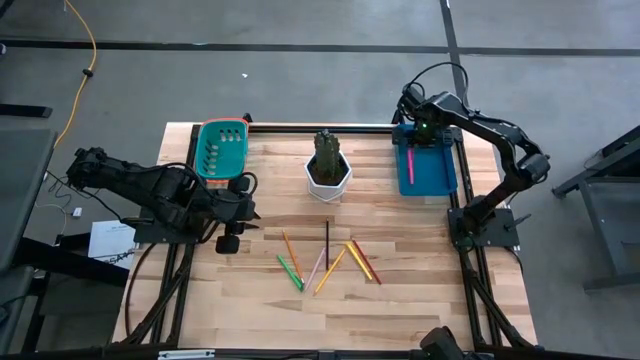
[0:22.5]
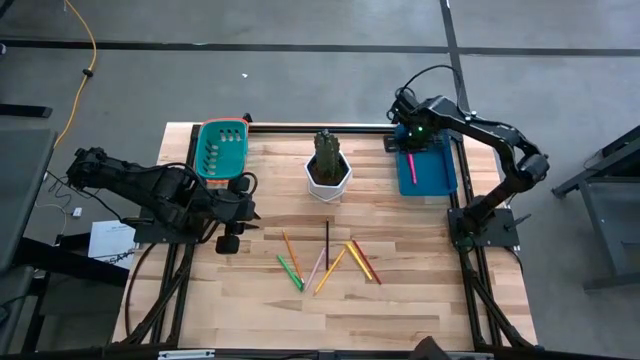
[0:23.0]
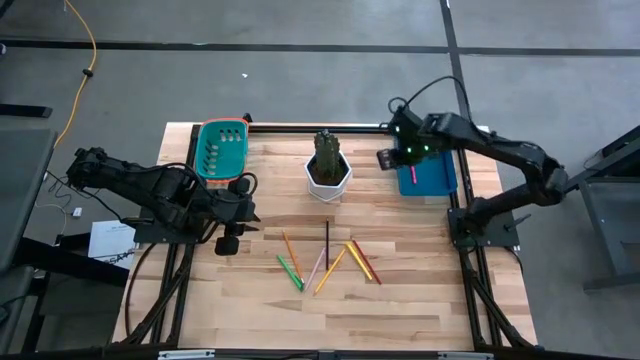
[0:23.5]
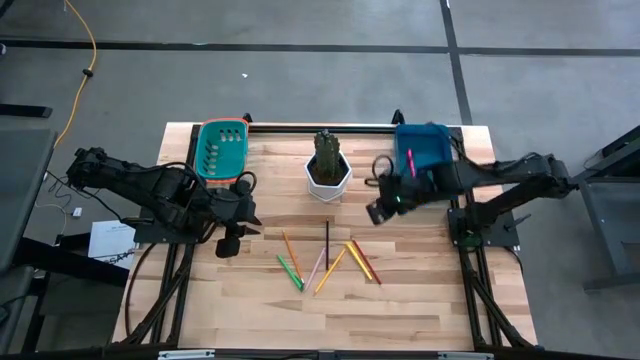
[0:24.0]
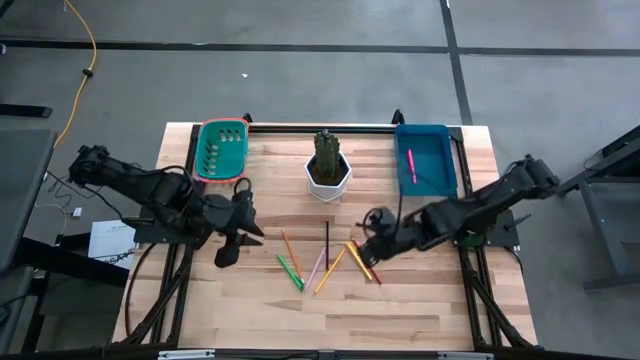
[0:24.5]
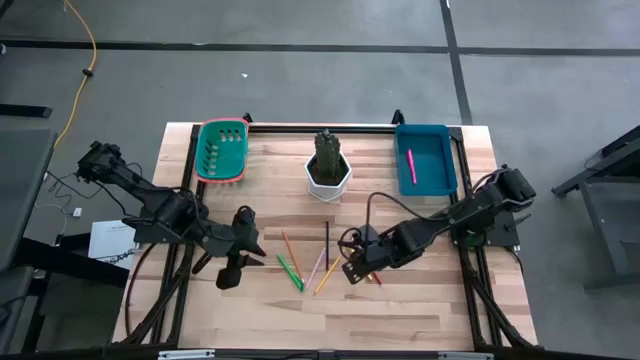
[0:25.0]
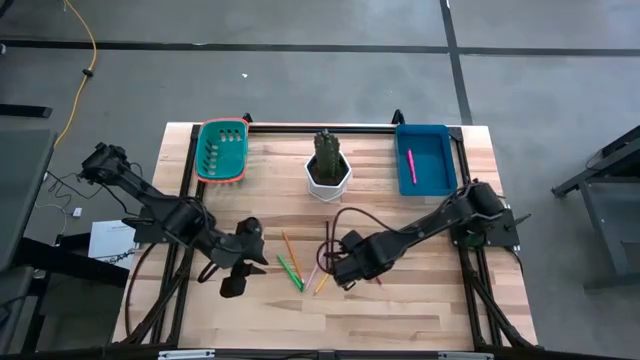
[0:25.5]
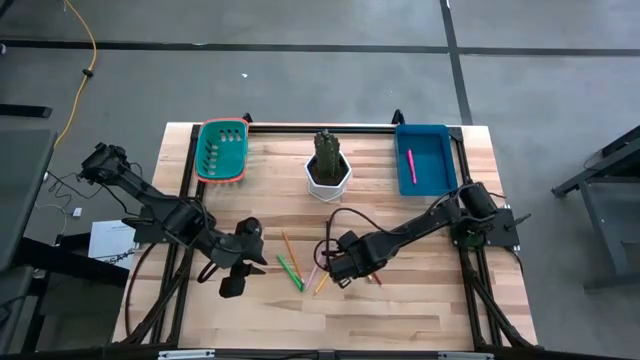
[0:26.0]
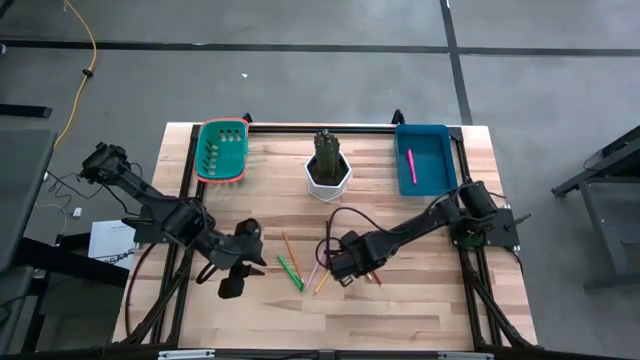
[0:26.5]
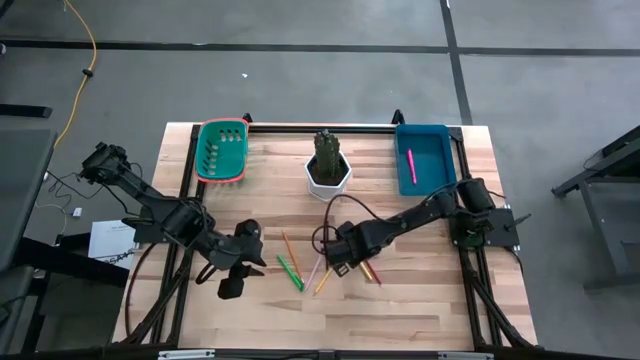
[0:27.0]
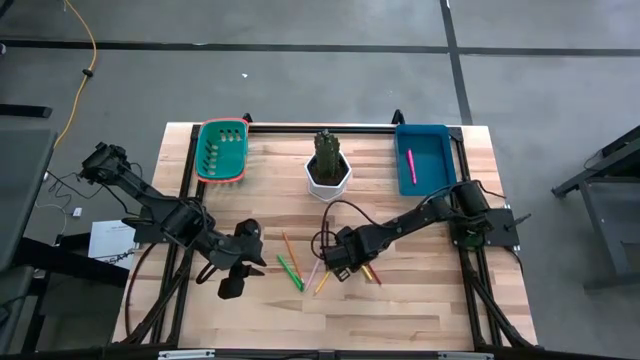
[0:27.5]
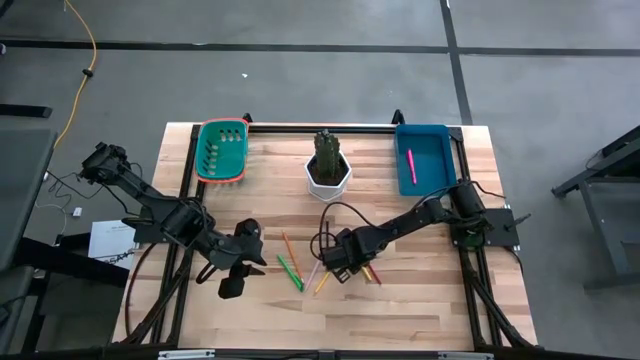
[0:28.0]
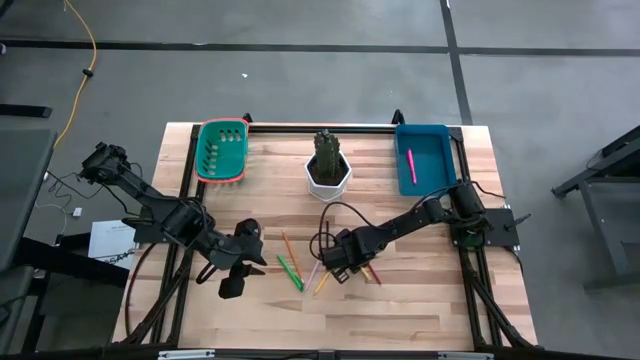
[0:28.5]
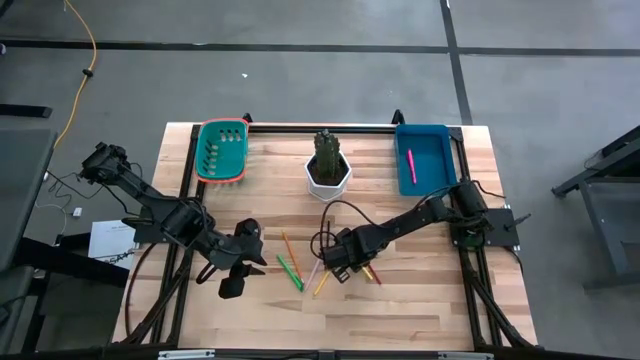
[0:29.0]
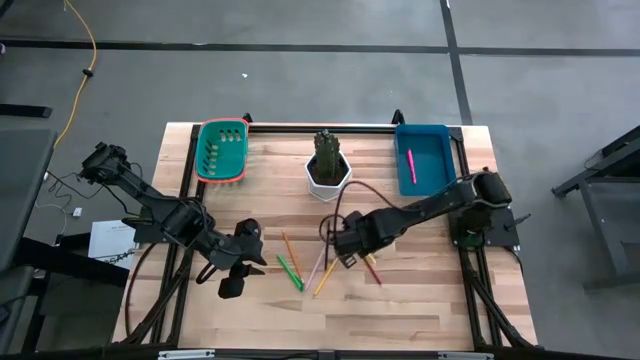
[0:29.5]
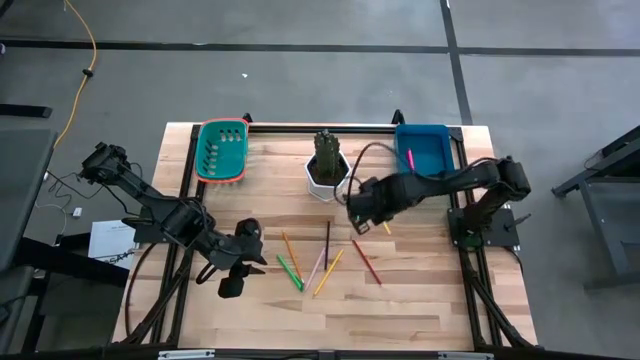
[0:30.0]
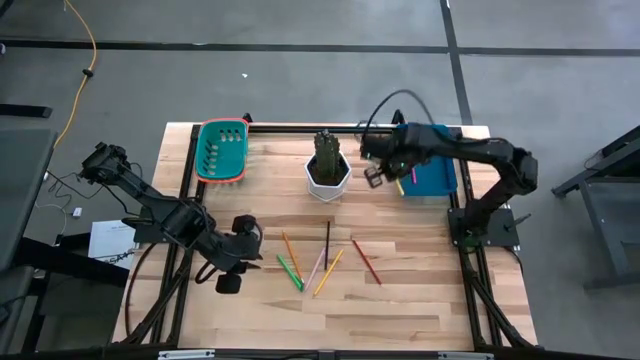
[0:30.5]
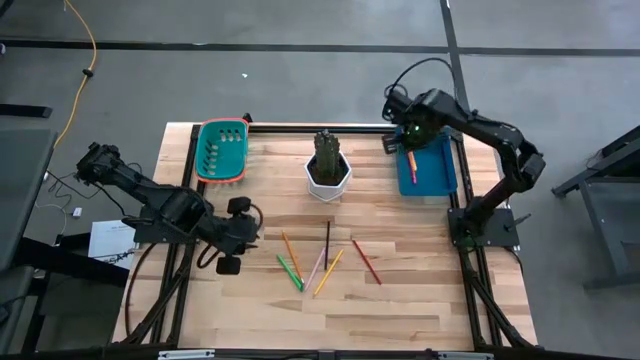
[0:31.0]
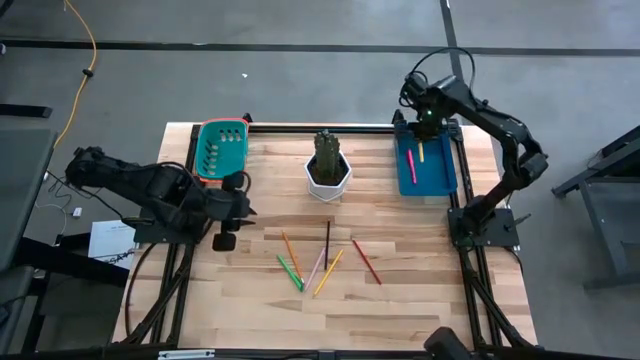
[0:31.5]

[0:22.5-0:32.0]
Task: Sort pens & pencils
Put the yellow pen into the blue bin
